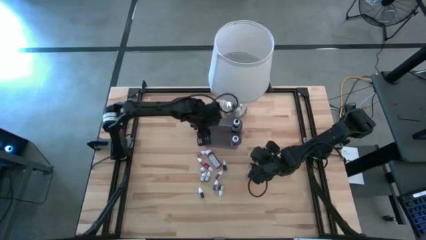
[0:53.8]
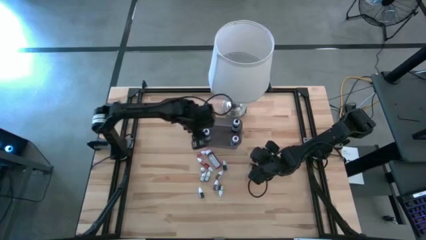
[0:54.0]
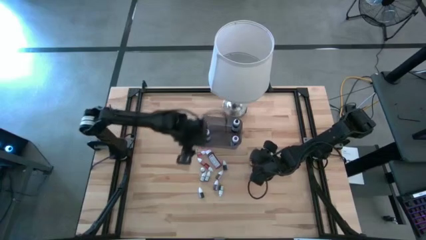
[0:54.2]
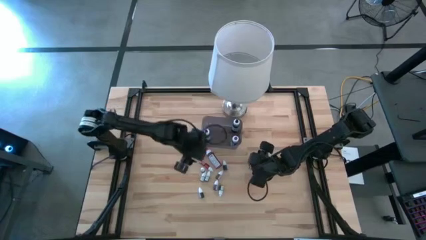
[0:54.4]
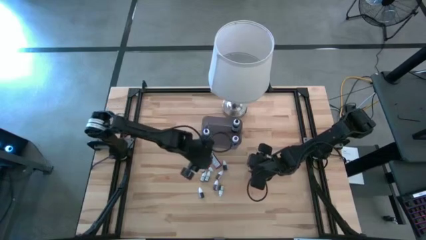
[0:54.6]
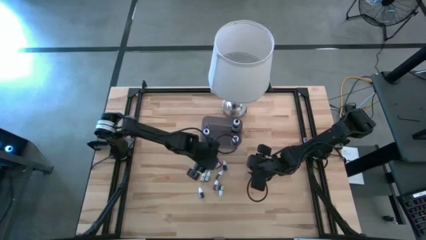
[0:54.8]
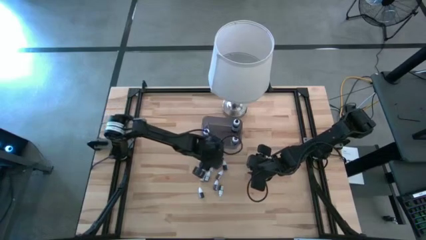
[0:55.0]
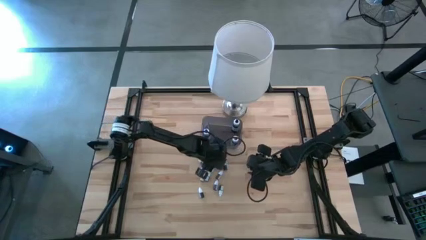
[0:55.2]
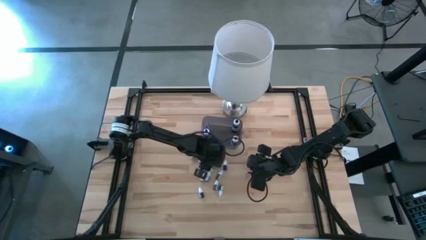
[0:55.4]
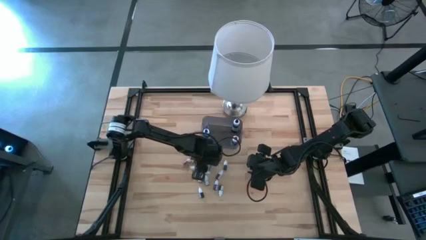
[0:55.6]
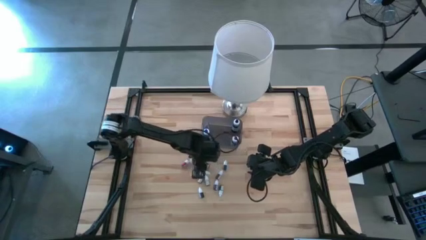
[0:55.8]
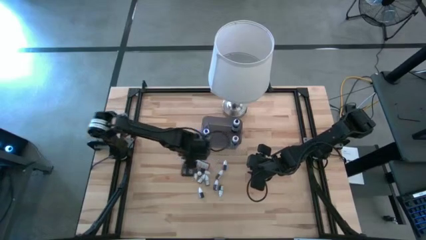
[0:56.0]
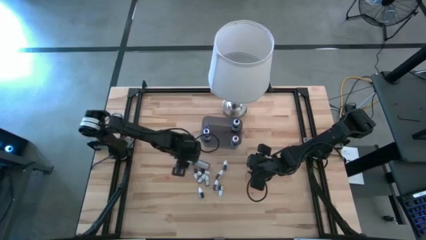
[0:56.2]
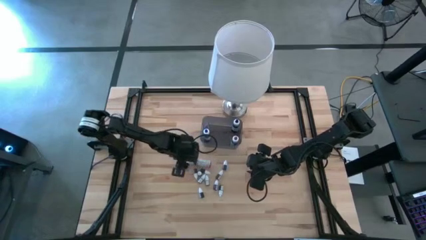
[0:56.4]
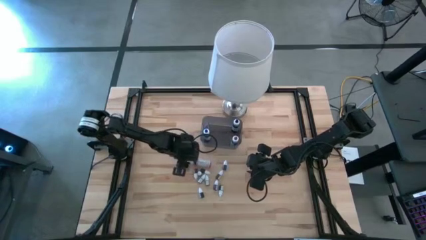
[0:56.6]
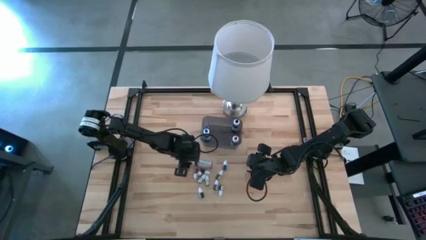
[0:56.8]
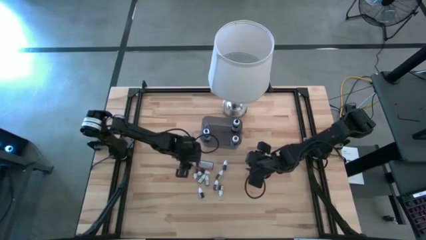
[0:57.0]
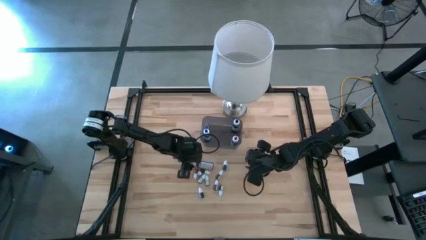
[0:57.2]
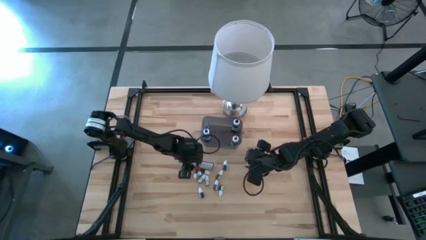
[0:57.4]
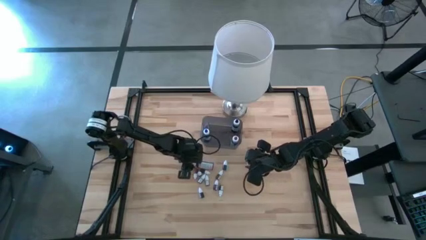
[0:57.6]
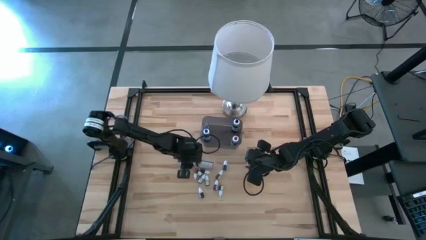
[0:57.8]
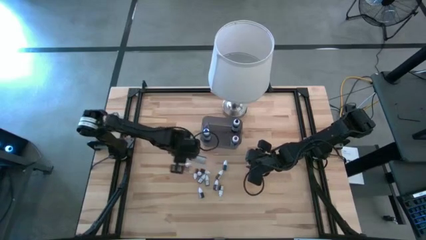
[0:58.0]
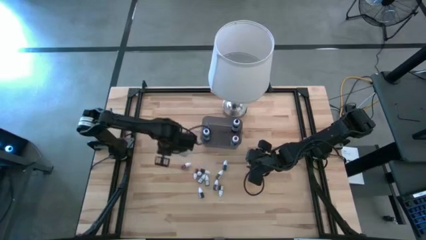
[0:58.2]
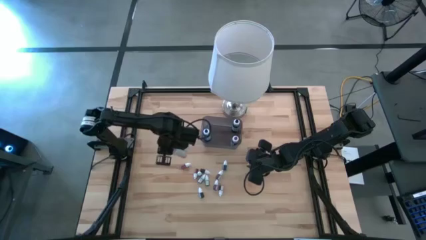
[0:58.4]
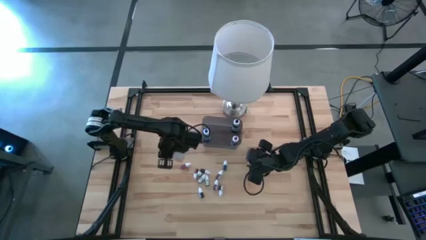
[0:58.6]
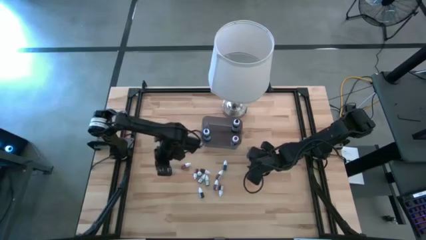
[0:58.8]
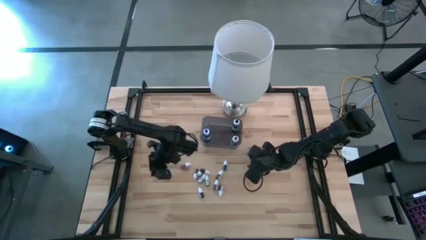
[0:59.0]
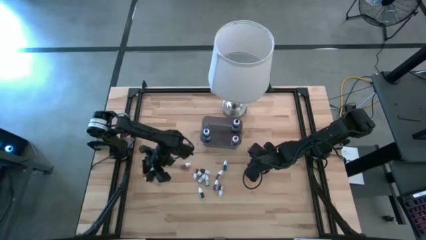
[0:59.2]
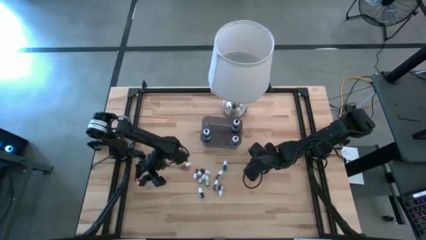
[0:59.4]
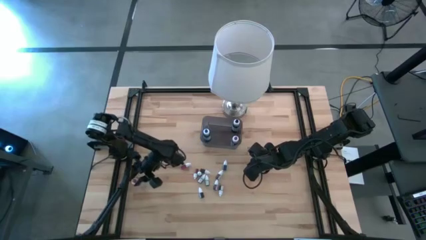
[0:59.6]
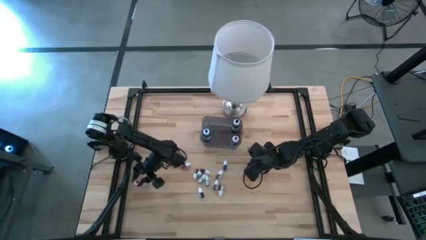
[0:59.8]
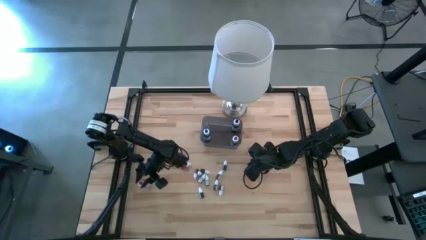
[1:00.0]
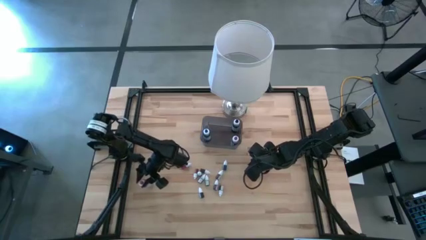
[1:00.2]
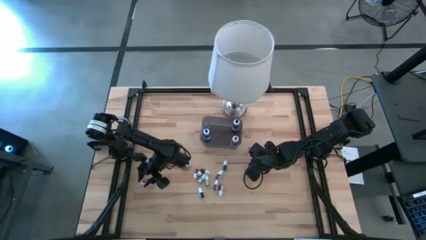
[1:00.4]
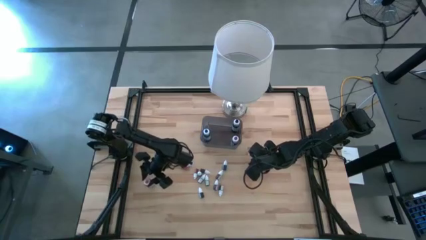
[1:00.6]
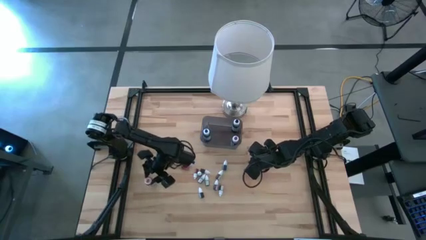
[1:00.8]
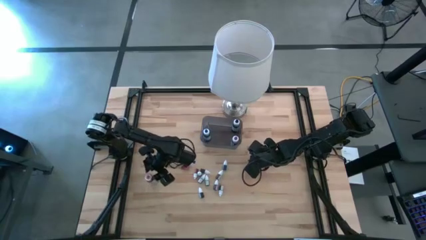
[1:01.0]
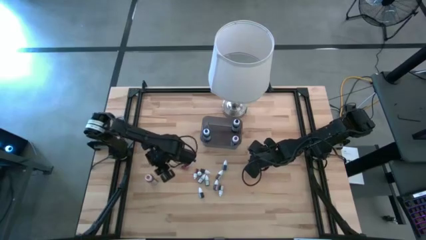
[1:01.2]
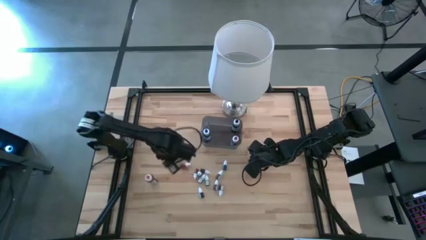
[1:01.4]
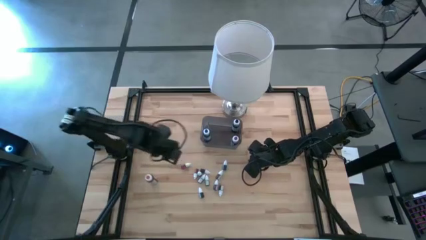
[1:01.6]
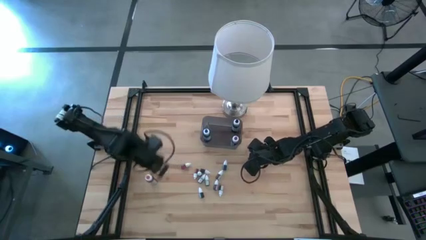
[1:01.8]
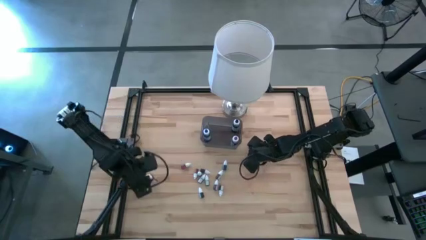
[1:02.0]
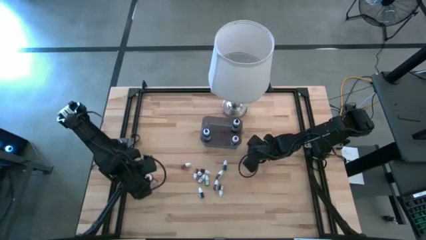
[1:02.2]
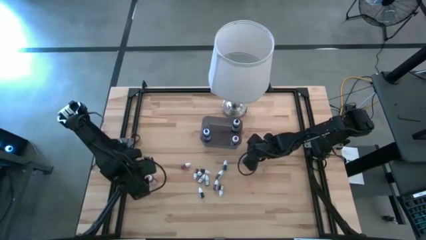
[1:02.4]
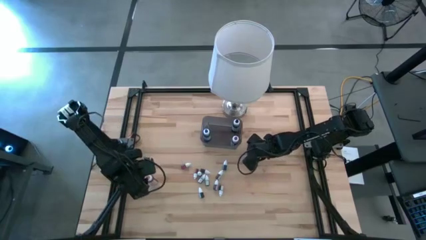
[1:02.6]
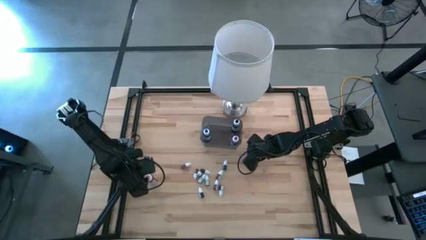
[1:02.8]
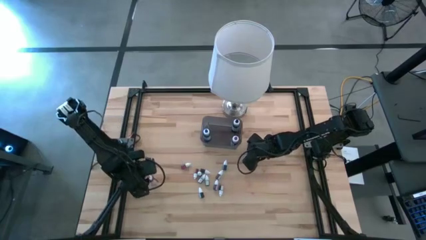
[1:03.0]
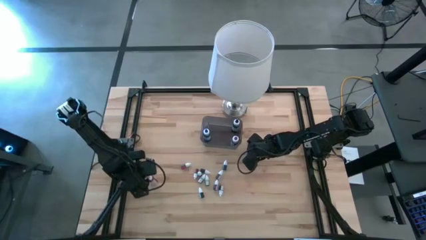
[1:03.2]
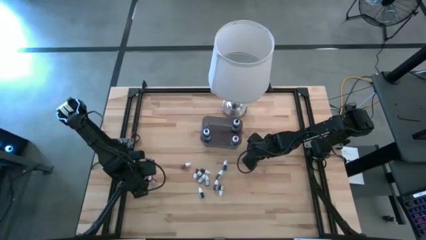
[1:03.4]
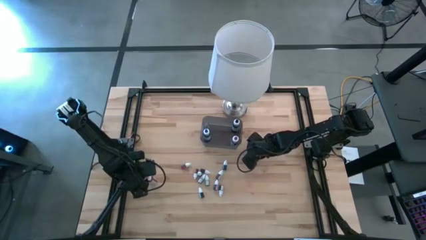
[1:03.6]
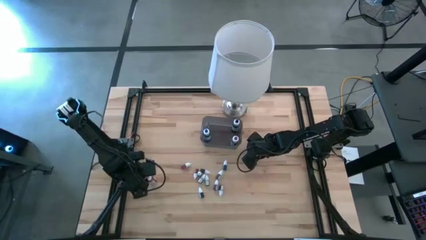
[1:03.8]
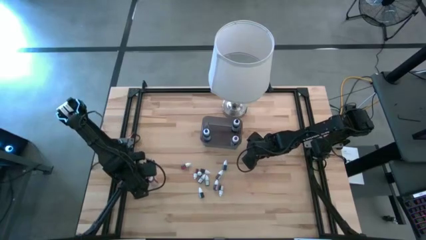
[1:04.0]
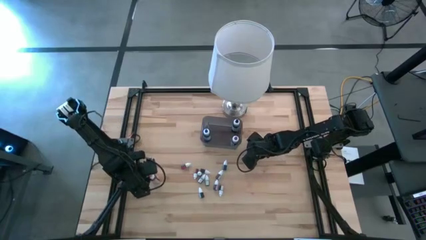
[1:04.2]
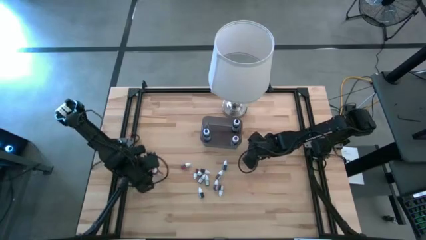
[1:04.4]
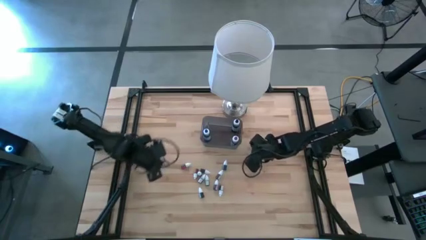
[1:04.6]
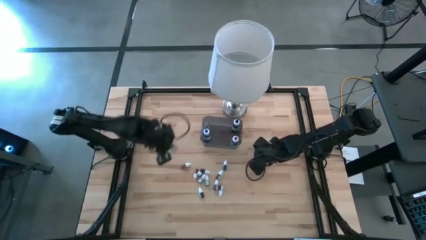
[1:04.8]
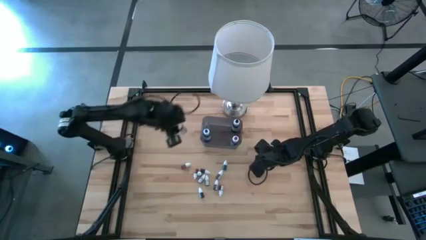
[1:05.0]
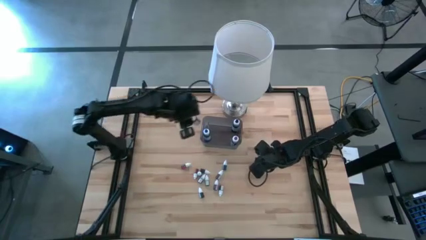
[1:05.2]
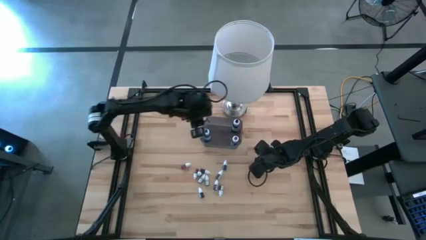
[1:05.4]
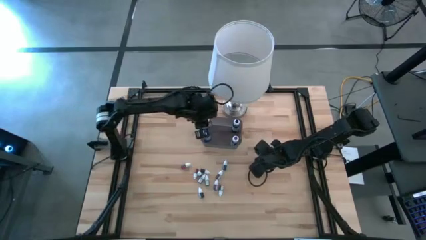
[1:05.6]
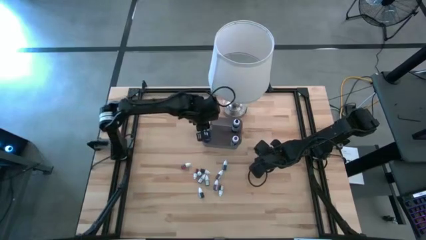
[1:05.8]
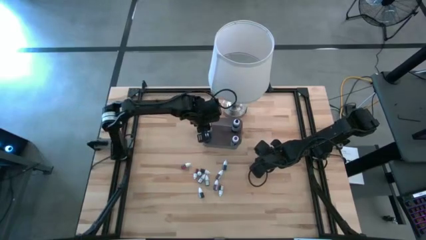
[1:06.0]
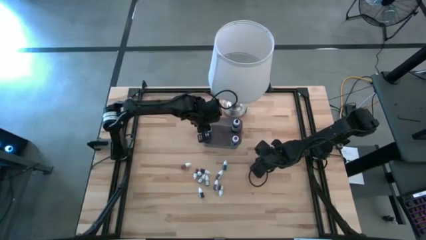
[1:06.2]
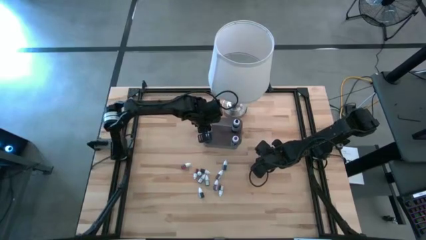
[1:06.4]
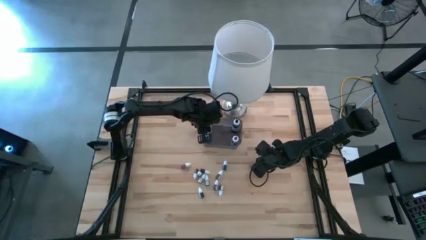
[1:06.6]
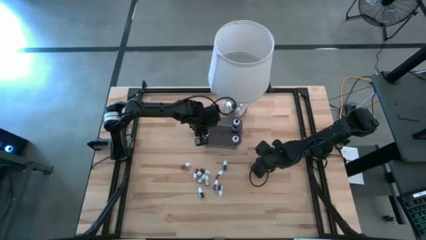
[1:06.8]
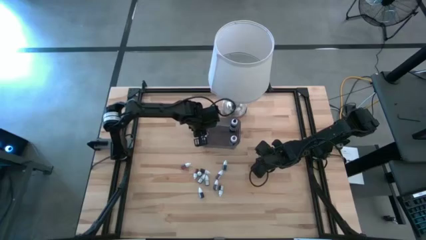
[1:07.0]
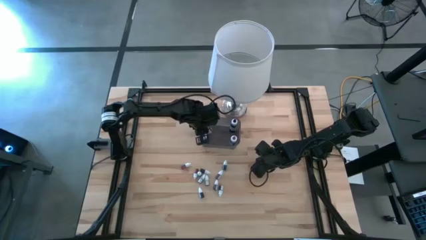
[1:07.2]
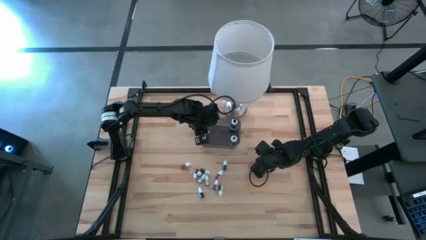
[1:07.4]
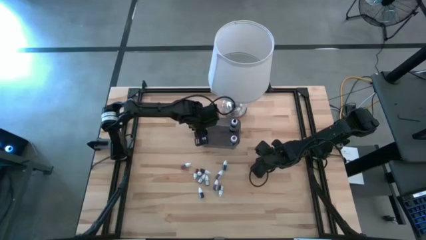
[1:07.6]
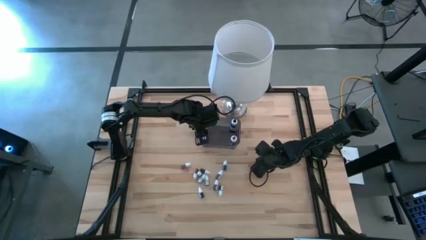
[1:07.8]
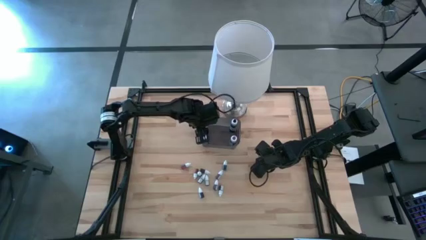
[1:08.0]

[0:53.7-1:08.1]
Task: Pick & Place food coloring
Put the big red food coloring bottle into the black bin

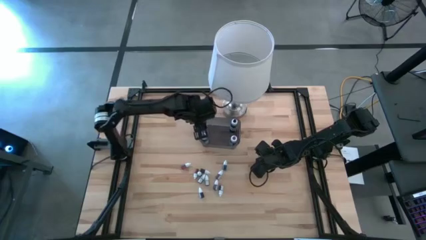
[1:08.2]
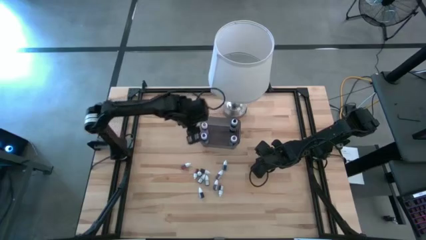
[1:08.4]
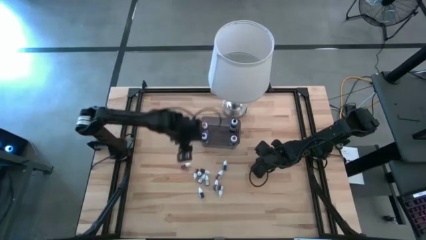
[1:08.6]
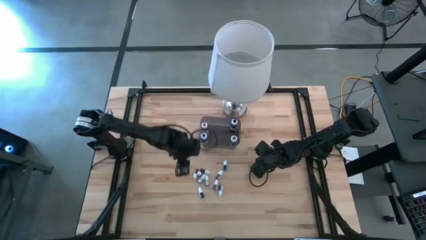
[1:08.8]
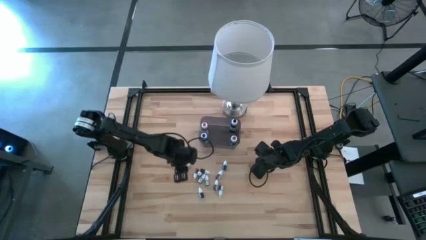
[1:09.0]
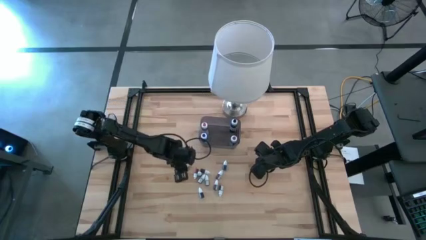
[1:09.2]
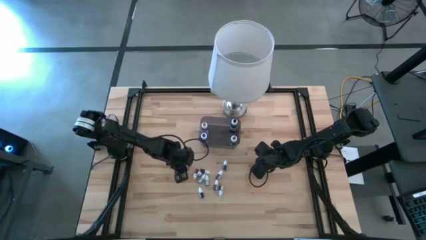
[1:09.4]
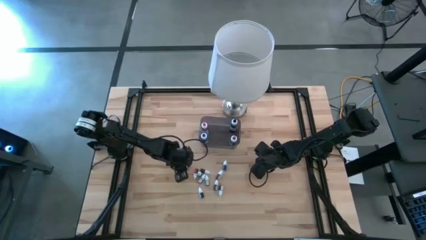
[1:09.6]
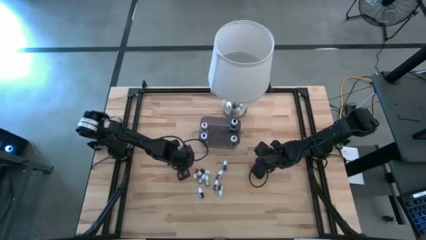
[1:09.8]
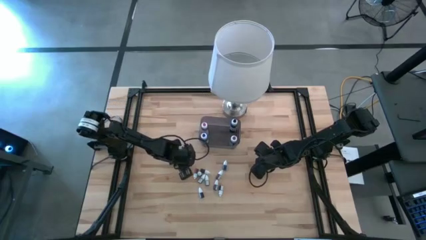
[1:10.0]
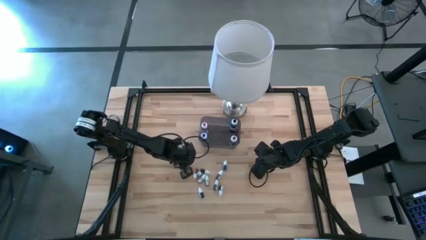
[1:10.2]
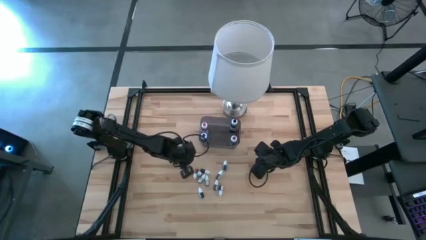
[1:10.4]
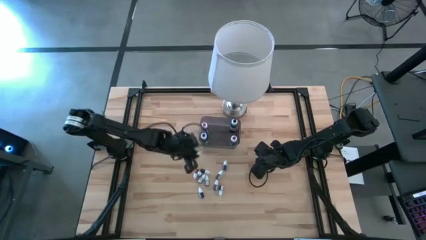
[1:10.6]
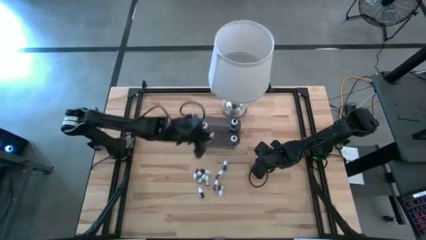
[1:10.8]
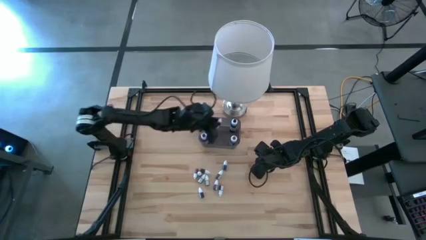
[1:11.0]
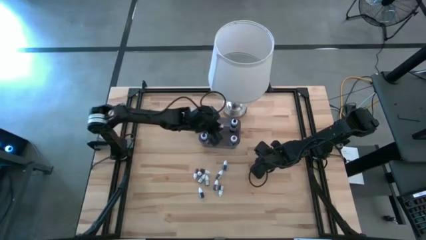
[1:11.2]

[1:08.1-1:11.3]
Put the small red food coloring bottle into the black bin
